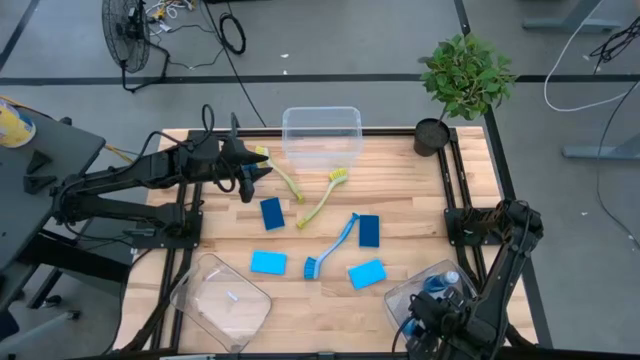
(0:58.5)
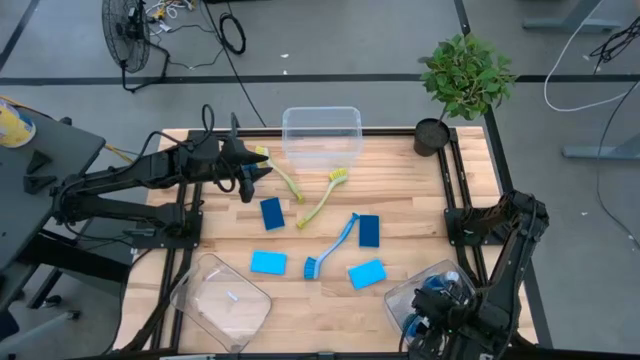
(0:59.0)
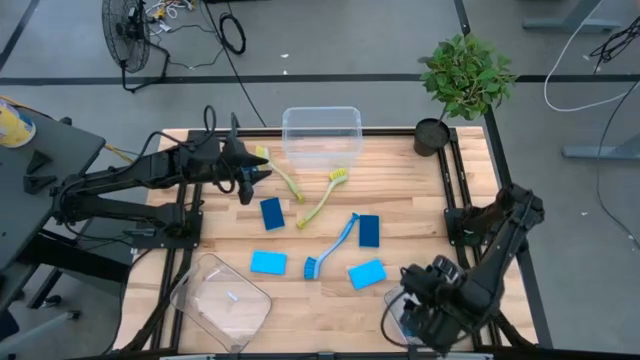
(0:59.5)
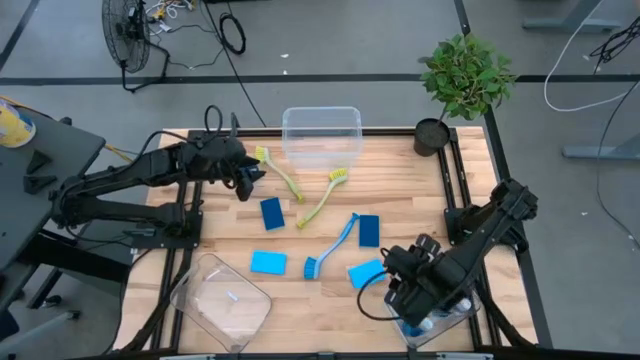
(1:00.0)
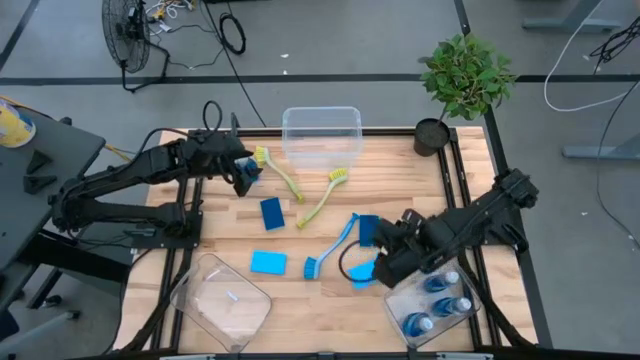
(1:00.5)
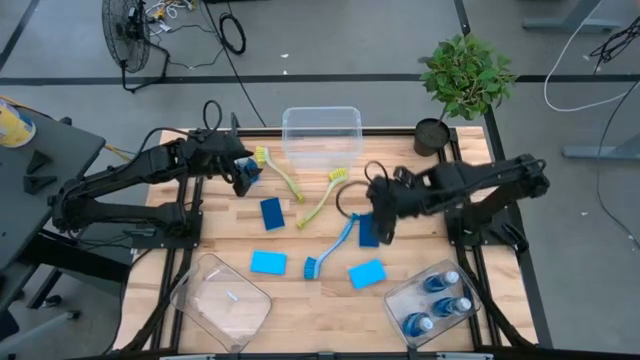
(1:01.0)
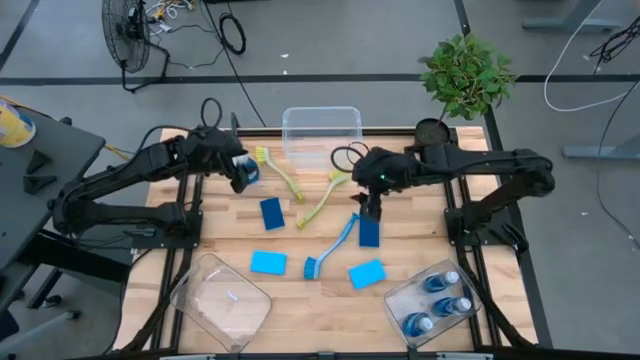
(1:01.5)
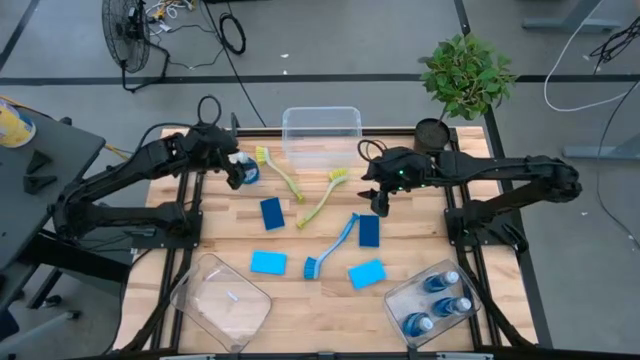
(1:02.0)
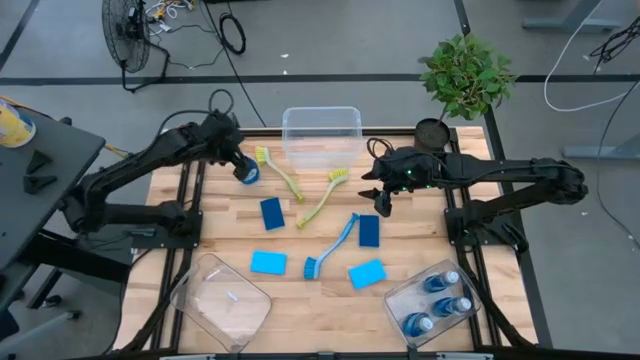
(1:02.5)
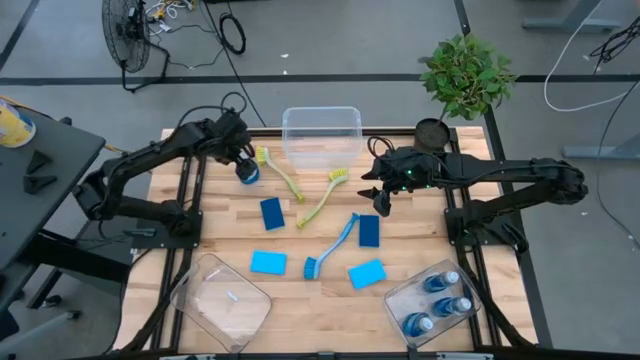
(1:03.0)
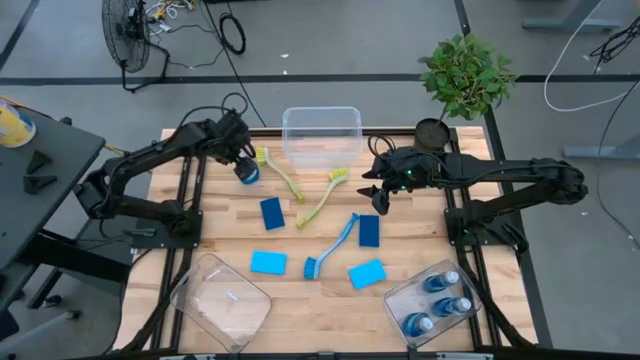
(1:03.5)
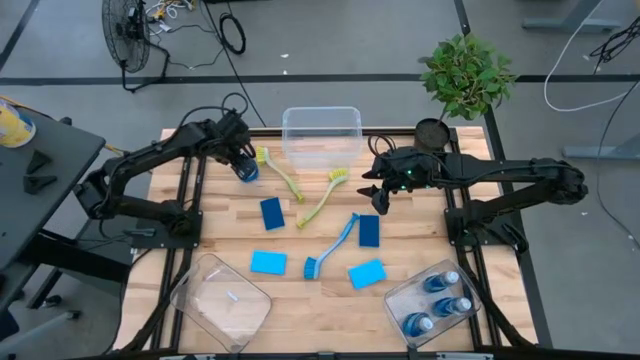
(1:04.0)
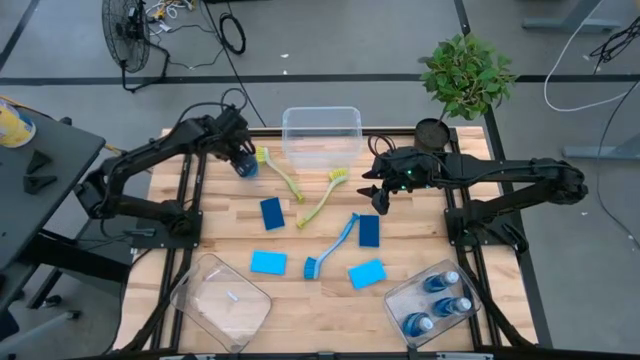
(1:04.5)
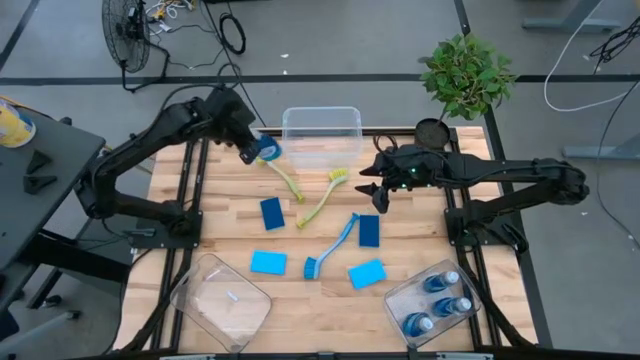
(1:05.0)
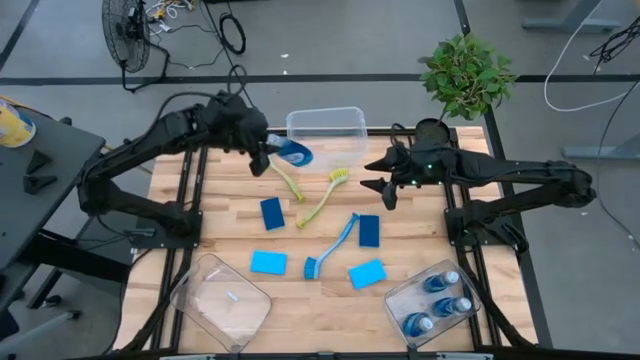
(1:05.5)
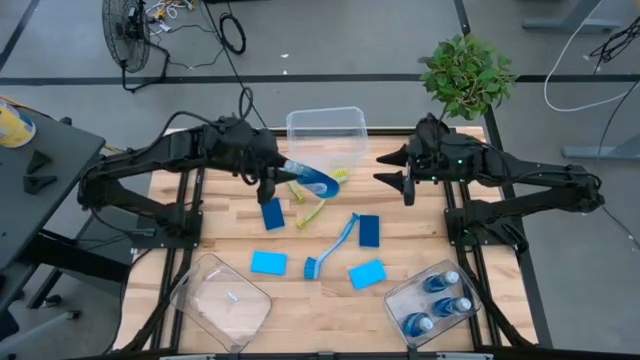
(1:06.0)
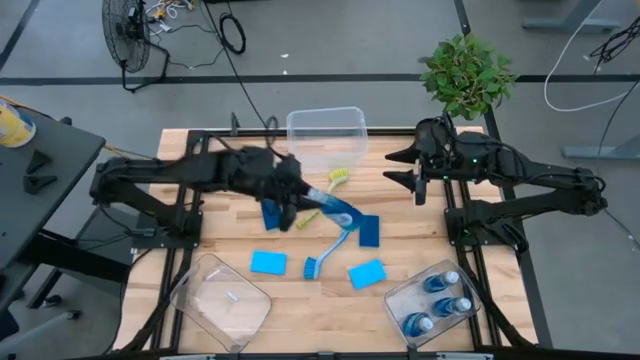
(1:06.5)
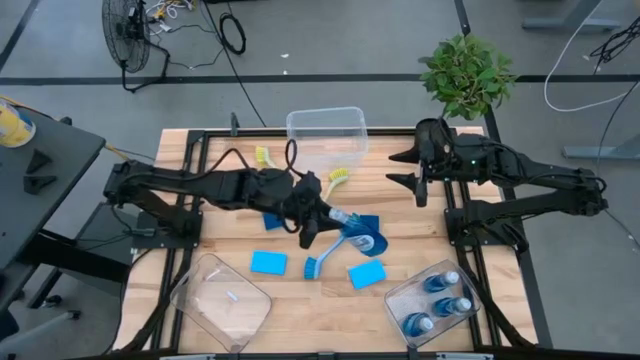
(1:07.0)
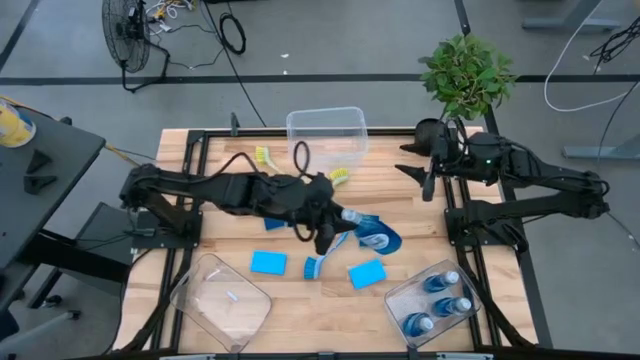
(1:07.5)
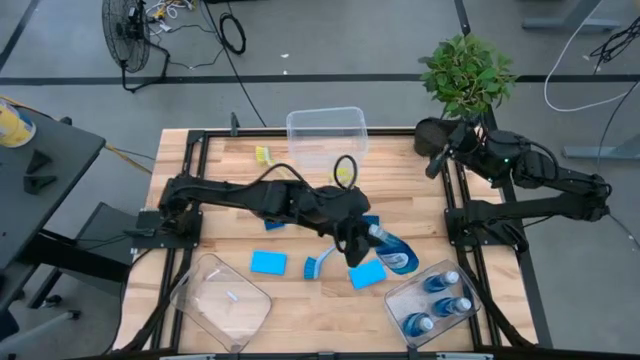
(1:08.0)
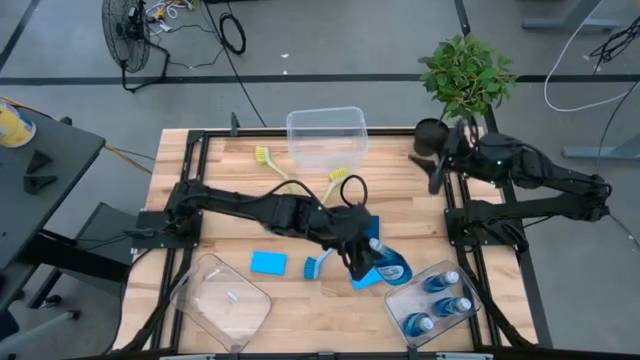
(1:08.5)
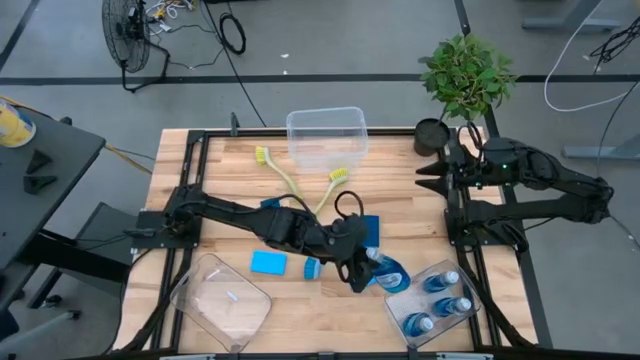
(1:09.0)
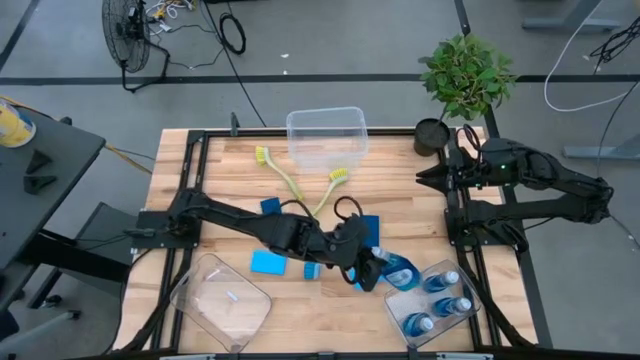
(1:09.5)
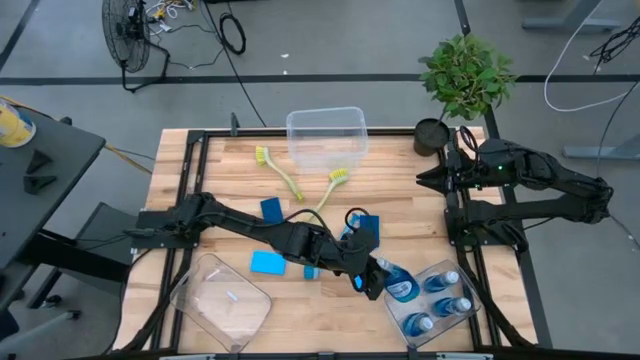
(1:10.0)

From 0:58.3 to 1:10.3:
Task: Pick & Place Kitchen Sink Supplies
Put the blue dishwashing liquid into the bottom right transparent bin

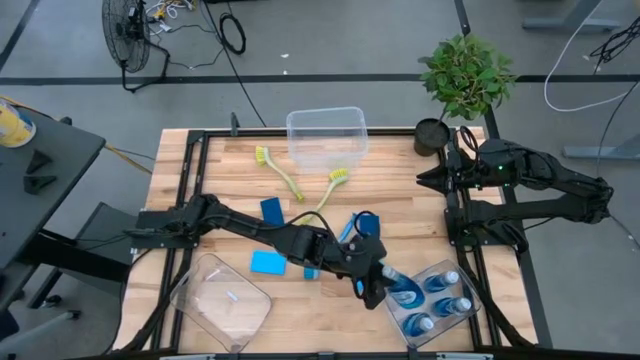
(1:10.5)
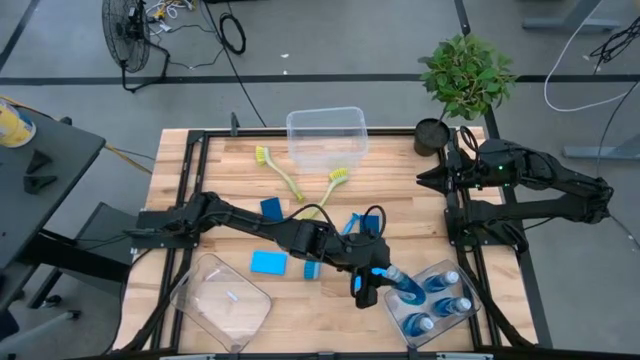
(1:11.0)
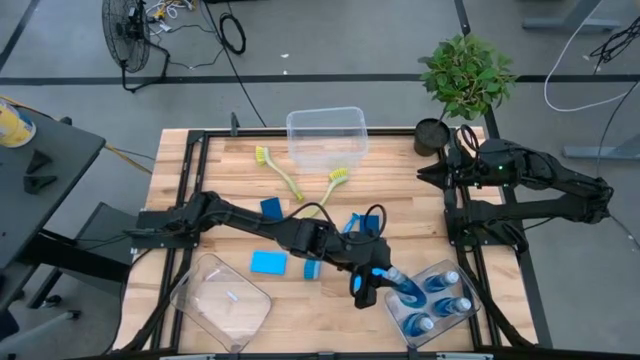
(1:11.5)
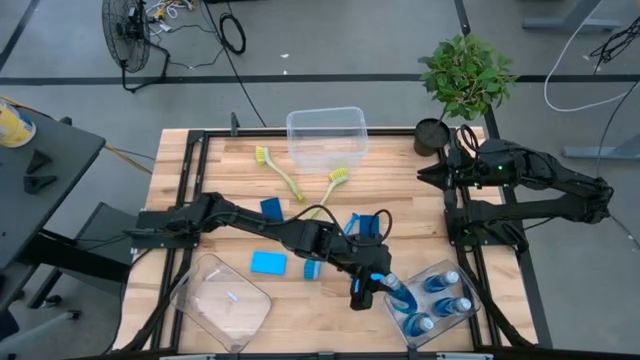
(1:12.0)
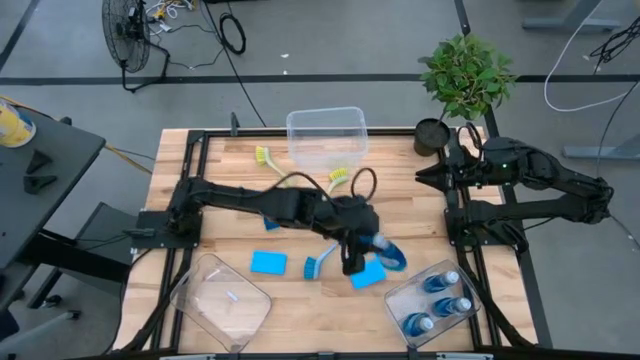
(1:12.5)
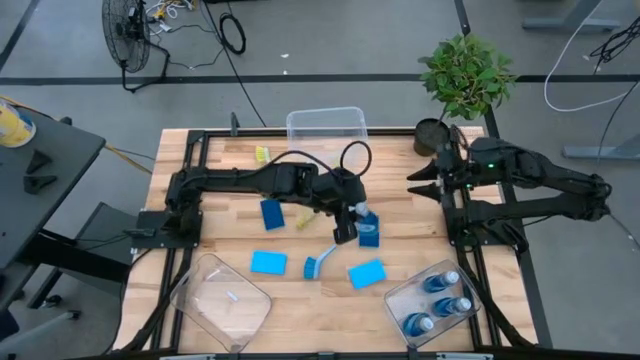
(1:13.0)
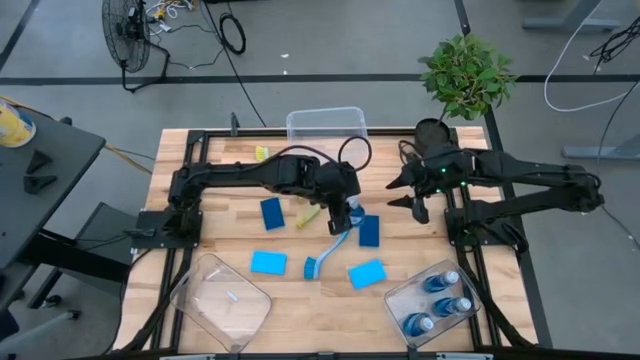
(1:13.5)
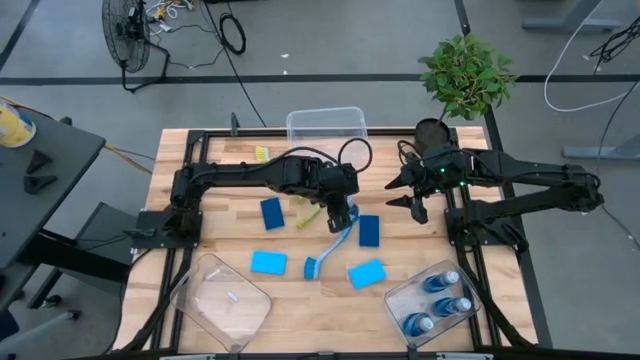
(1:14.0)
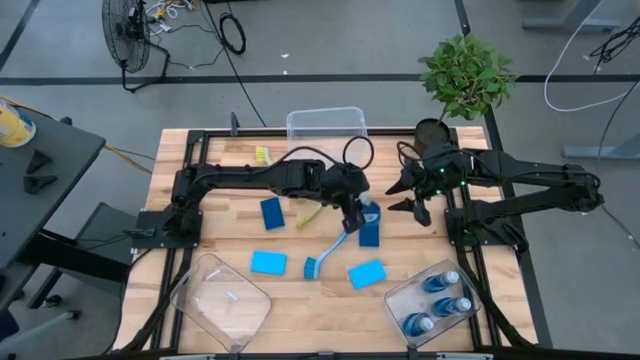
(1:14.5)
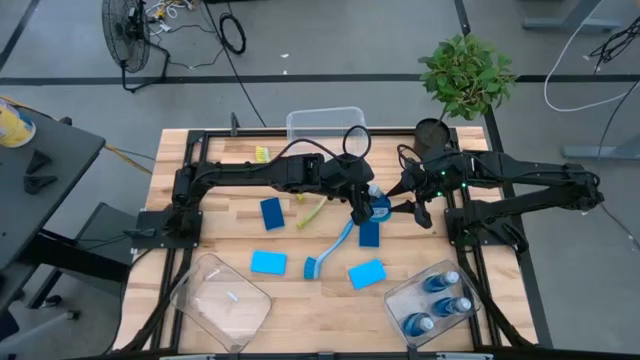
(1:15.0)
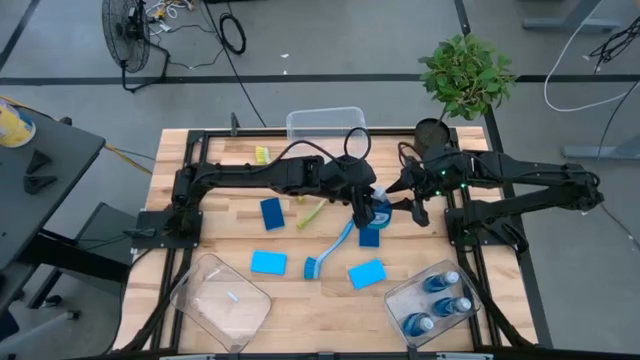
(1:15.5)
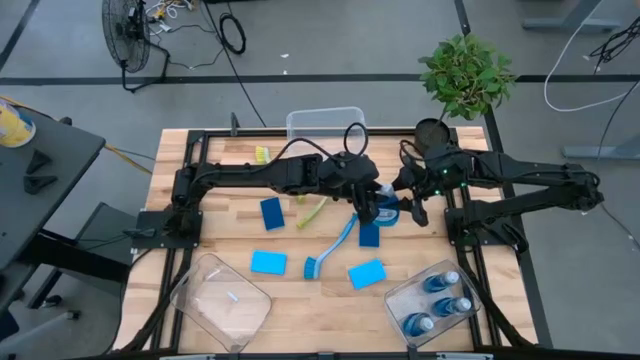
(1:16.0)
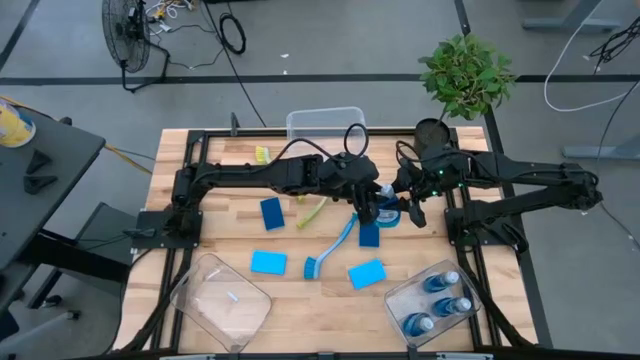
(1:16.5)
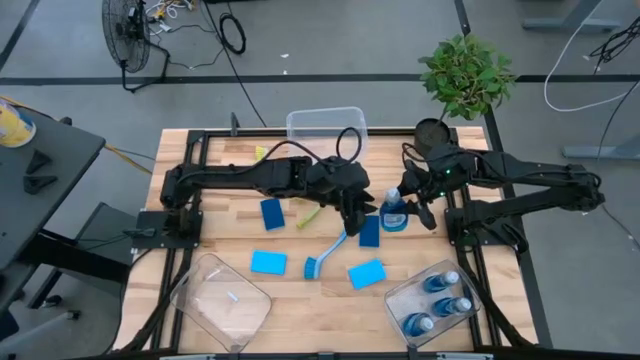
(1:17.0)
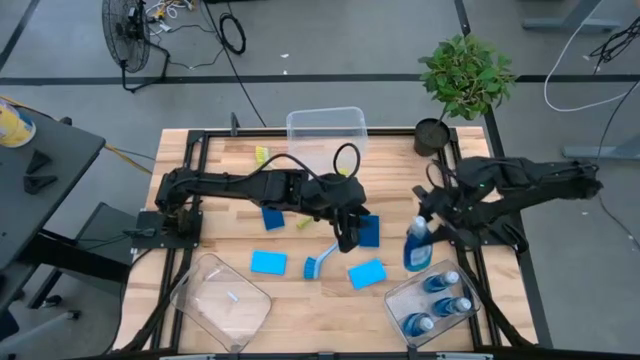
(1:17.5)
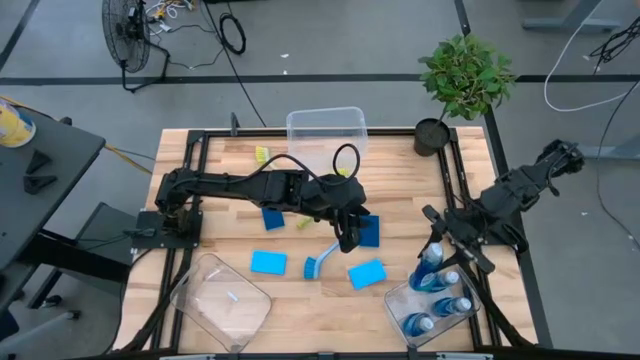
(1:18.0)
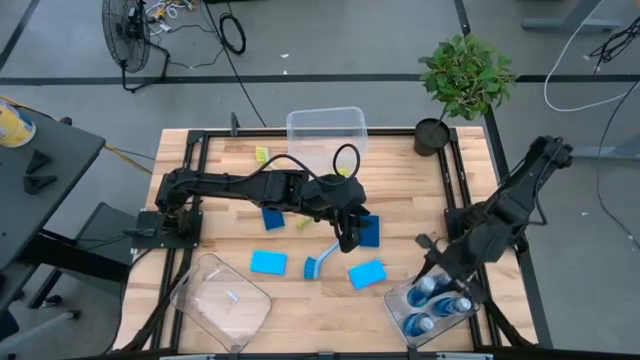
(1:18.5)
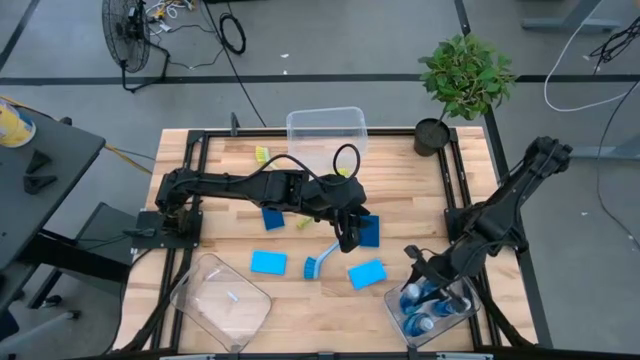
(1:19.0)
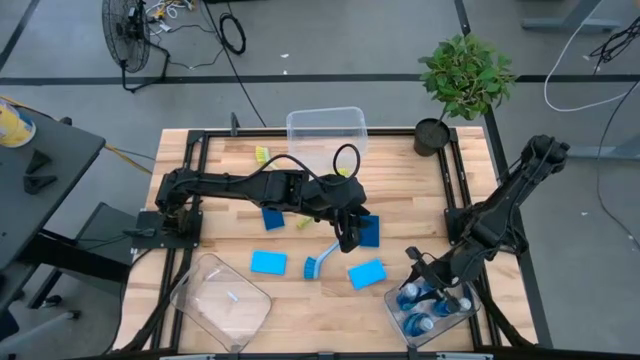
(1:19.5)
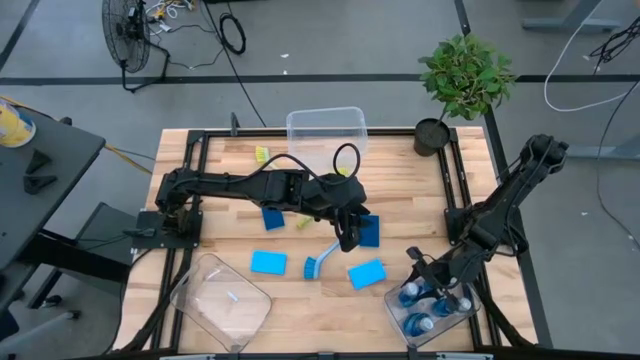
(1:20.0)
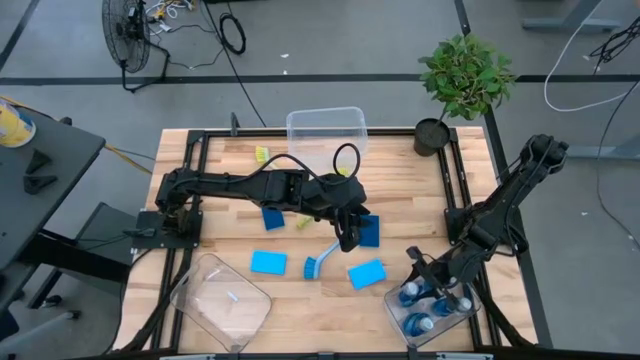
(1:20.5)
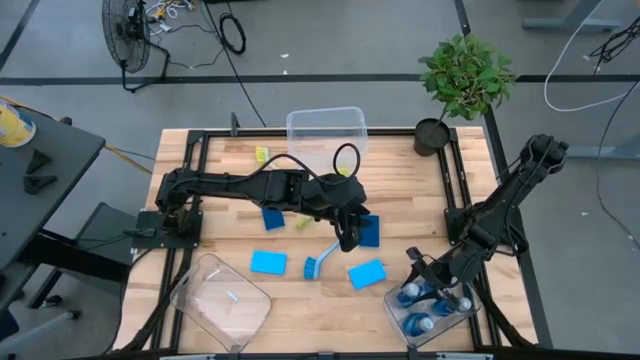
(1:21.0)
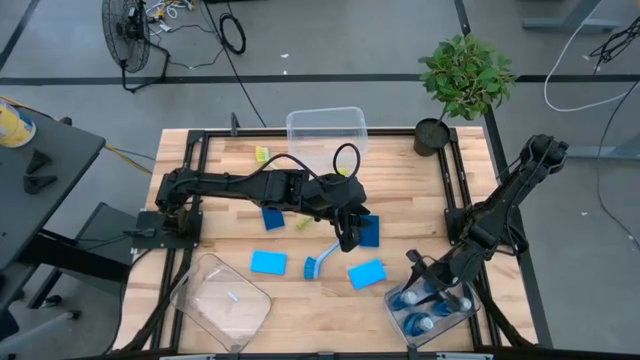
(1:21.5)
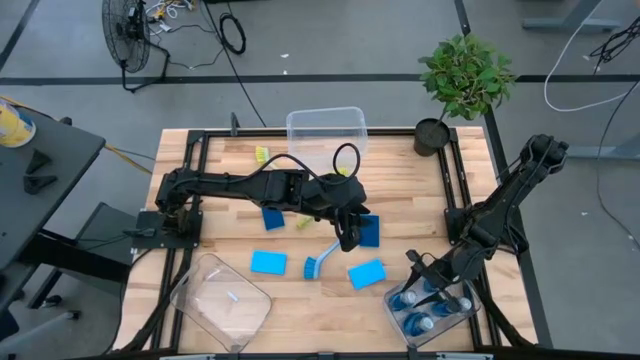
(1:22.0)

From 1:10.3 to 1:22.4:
Put the blue dishwashing liquid into the bottom right transparent bin
